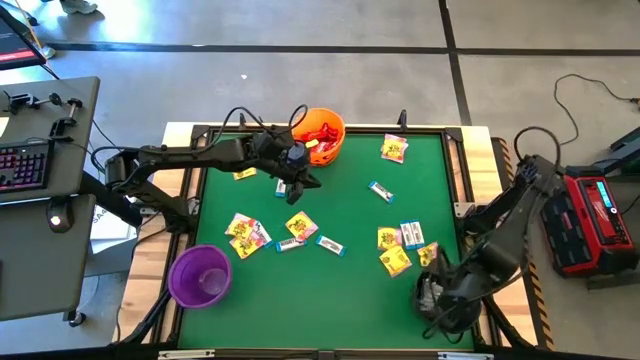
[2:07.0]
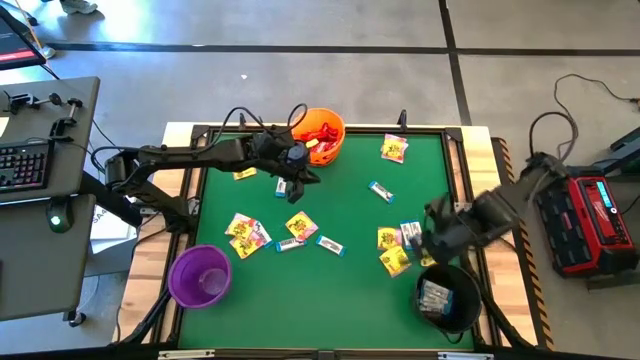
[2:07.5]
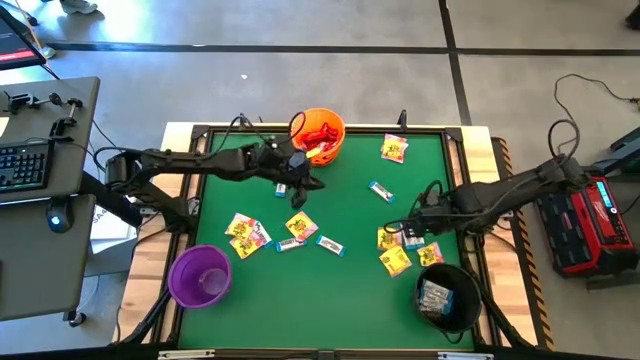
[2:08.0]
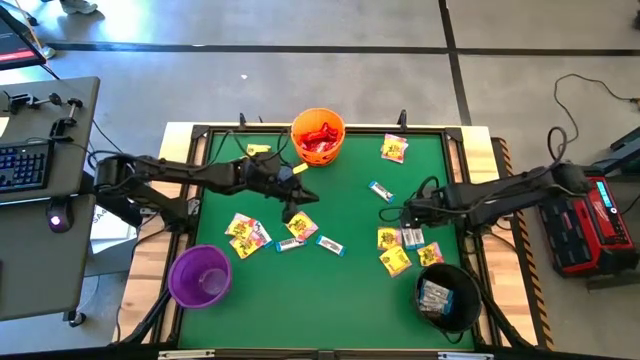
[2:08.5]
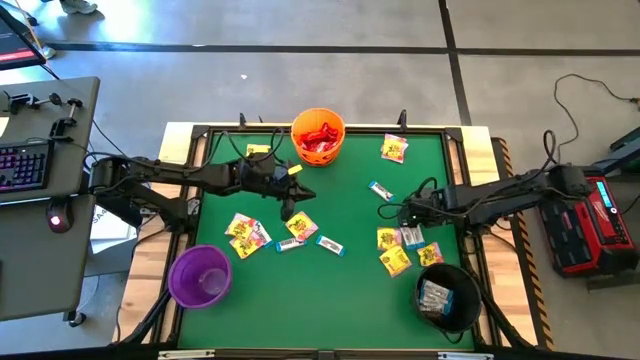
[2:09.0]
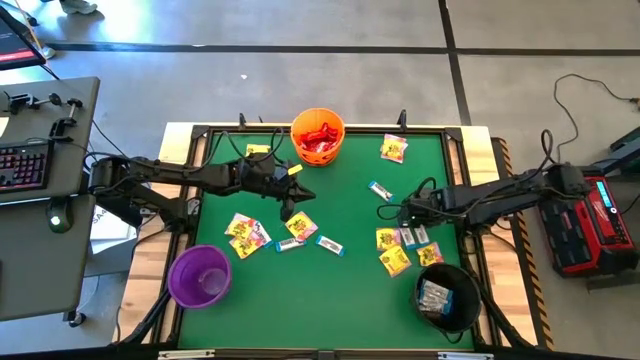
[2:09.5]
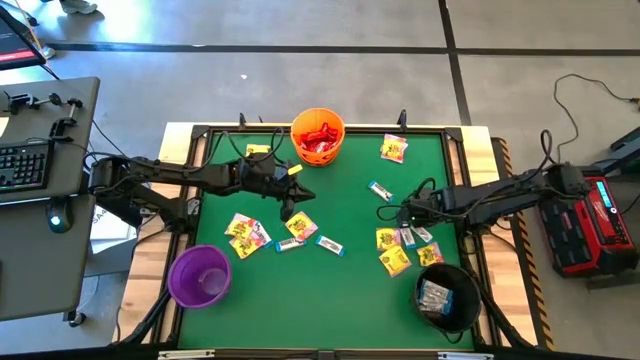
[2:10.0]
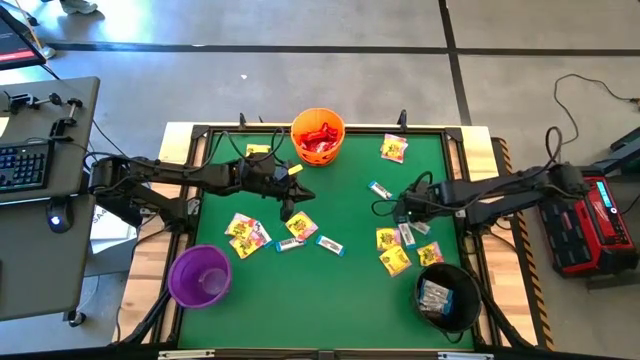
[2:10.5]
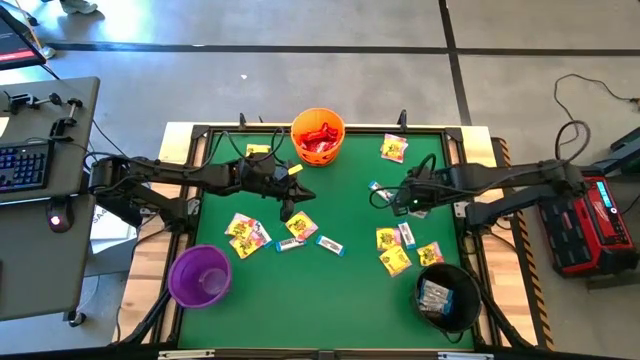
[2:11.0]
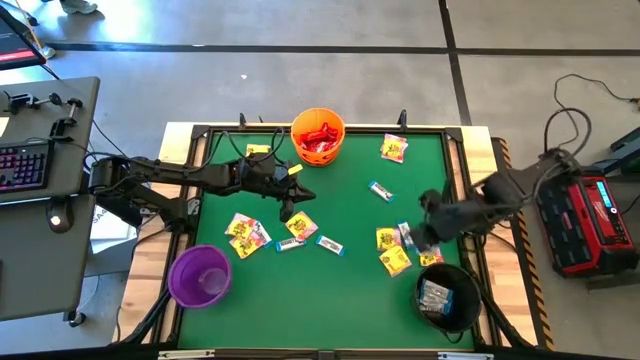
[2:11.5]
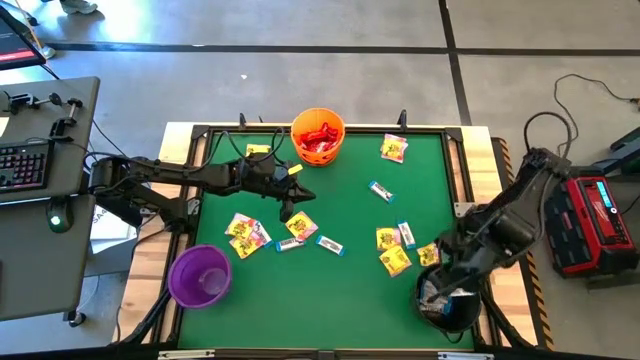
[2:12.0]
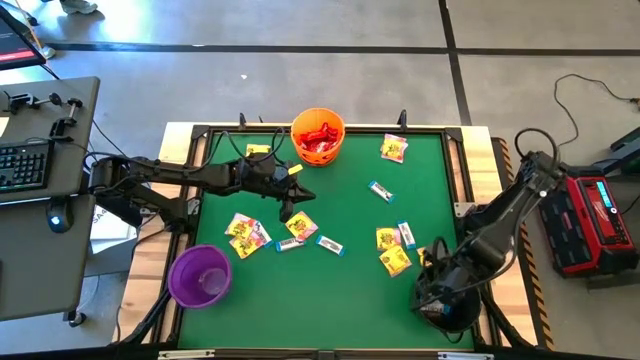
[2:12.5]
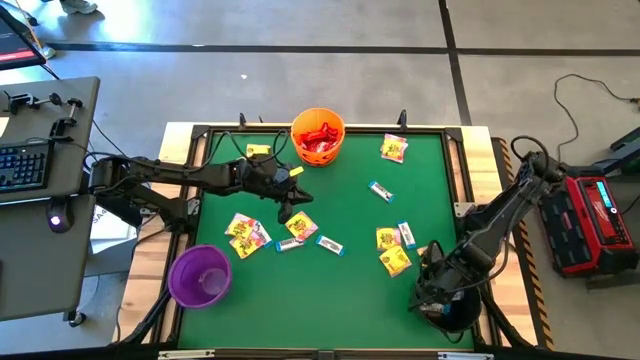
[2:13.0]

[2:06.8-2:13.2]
Task: Sort candy by brand, put in halloween buckets
Put the white chocolate bar into the black bucket

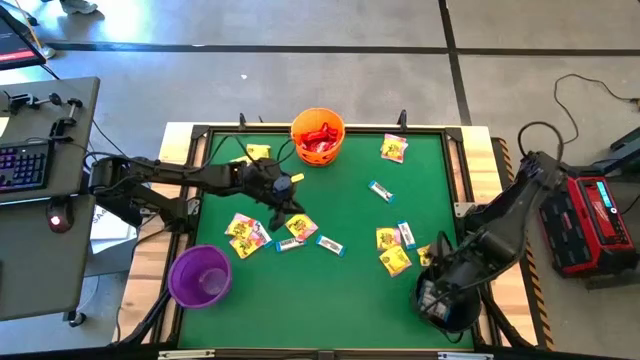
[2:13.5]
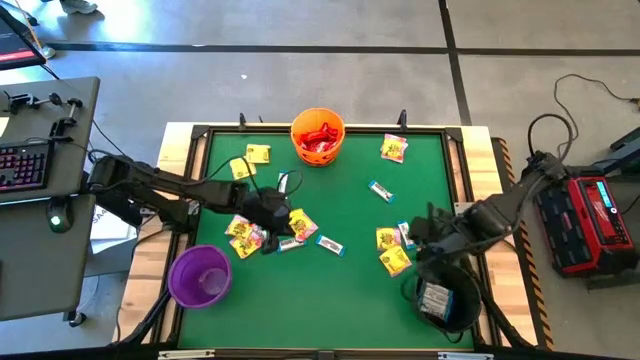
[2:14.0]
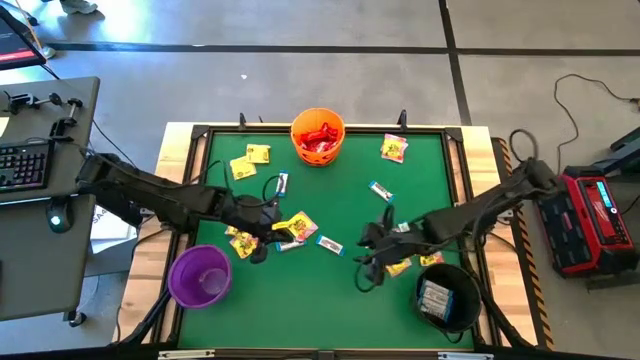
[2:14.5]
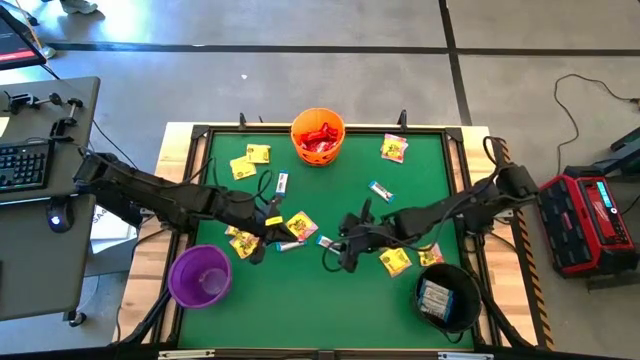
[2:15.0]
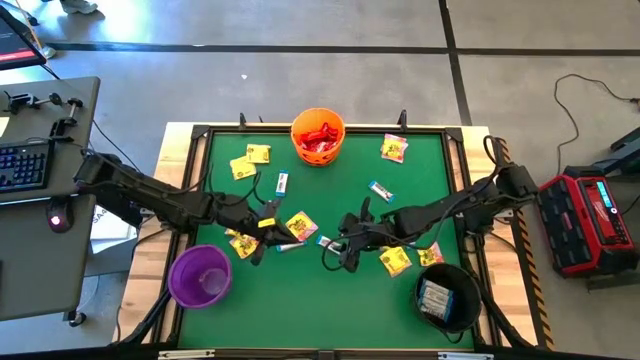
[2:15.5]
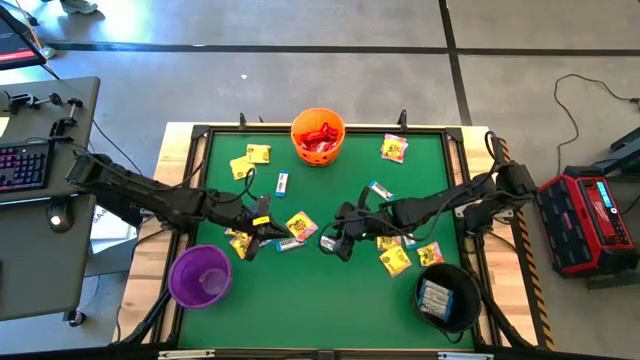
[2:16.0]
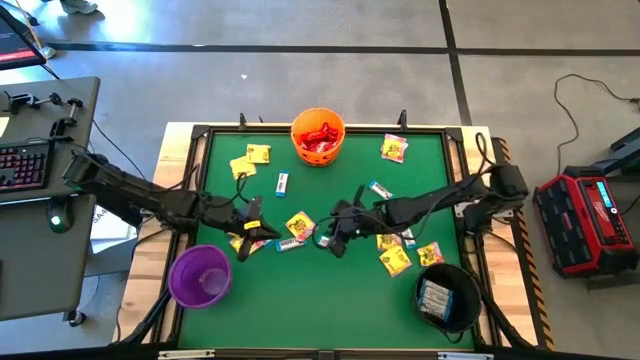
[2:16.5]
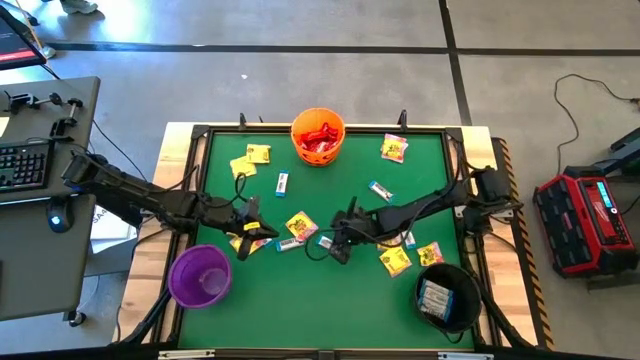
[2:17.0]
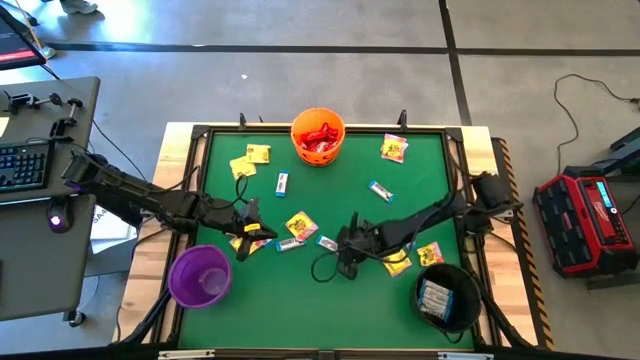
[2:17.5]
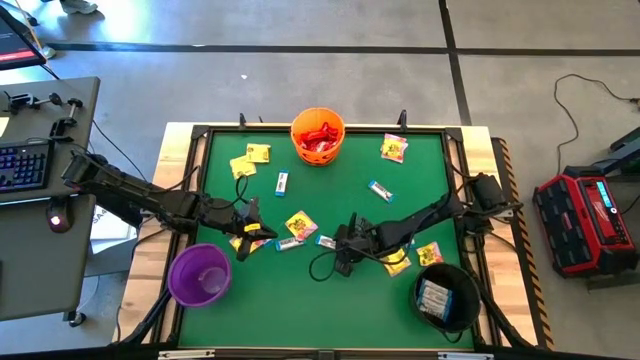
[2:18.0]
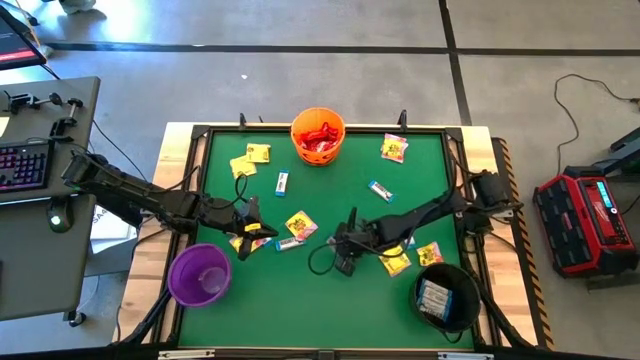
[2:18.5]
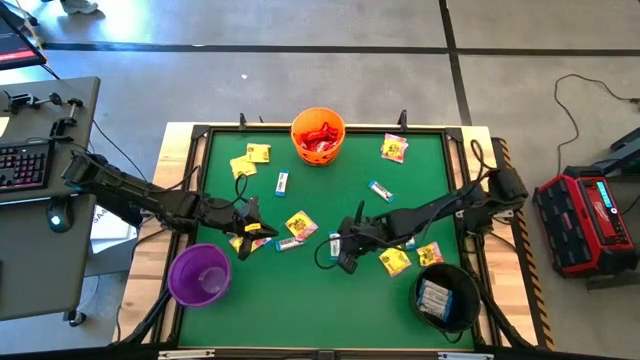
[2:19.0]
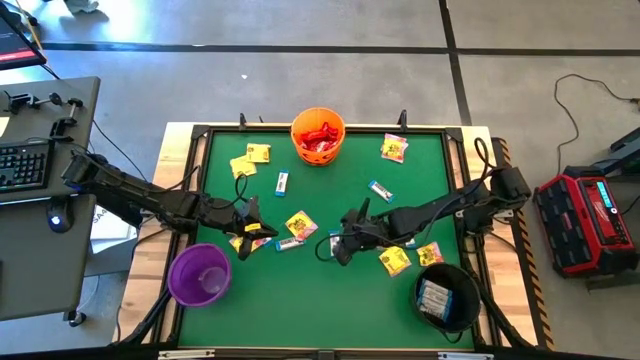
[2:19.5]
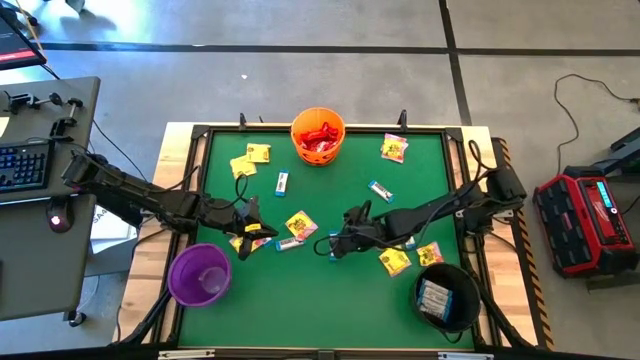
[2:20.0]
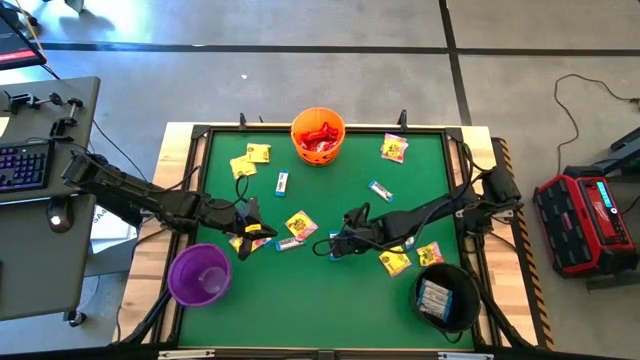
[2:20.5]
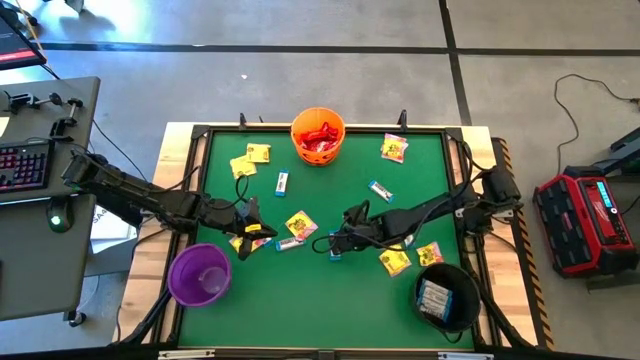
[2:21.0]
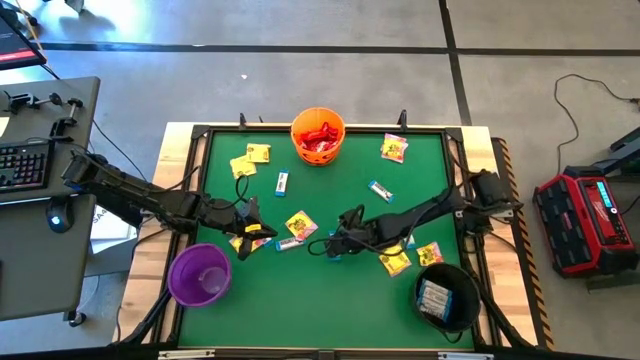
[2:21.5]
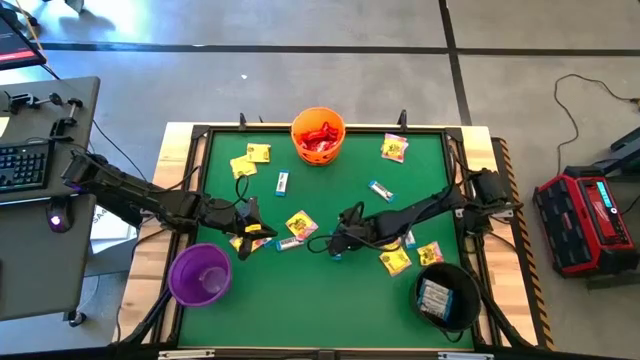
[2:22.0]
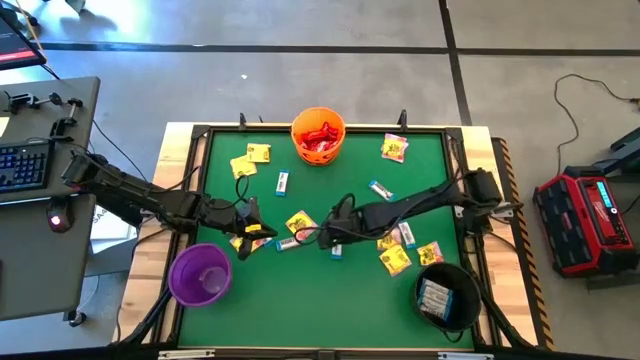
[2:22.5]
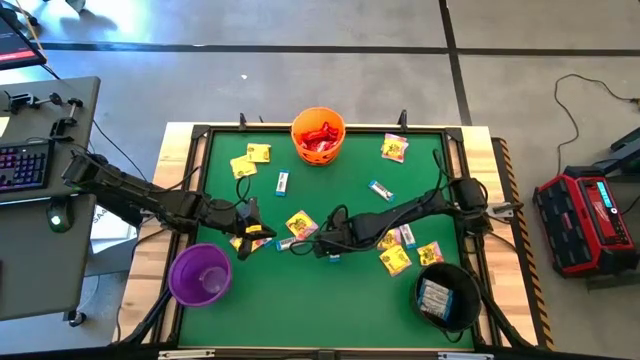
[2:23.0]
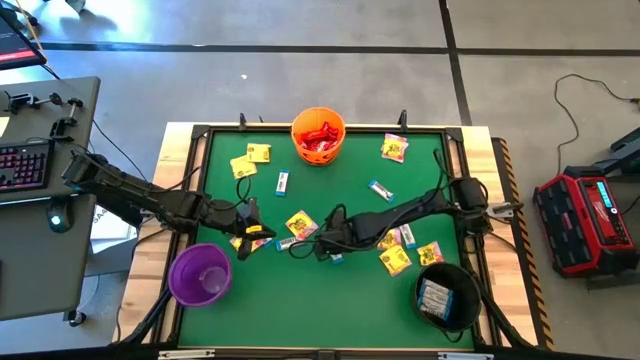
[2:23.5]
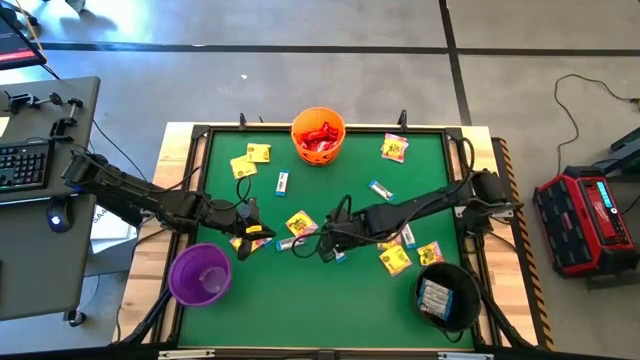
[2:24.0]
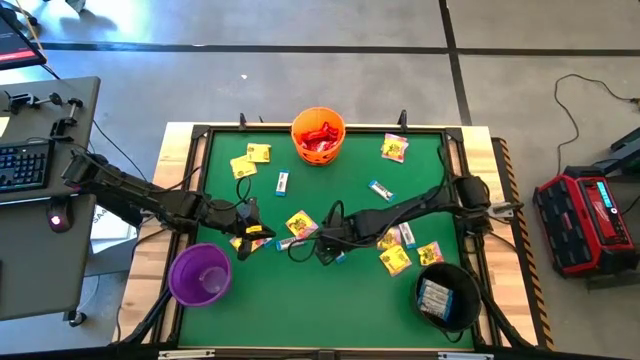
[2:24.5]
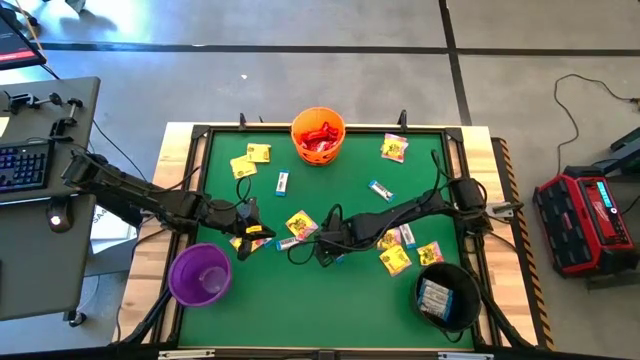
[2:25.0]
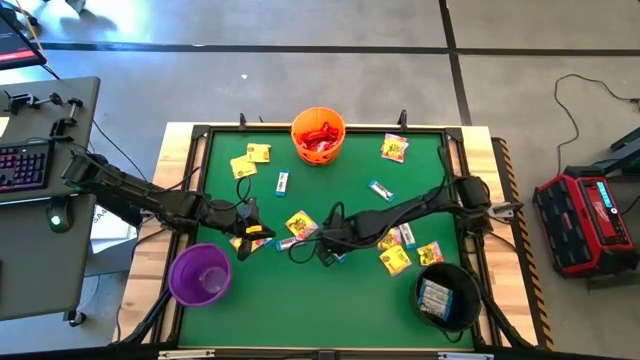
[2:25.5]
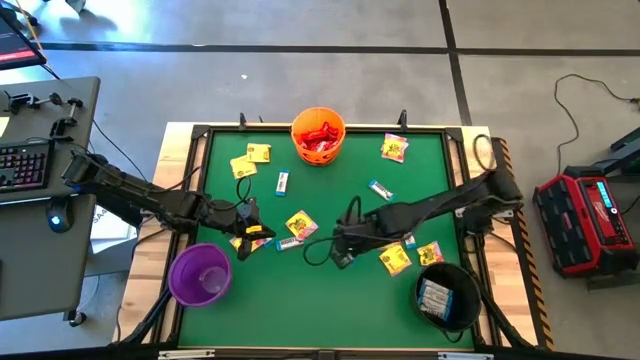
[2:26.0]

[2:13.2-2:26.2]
Put the white chocolate bar into the black bucket

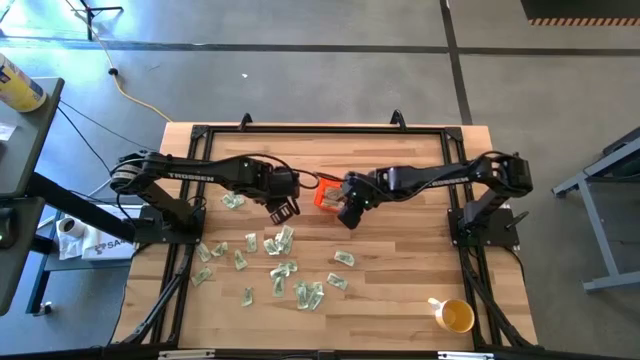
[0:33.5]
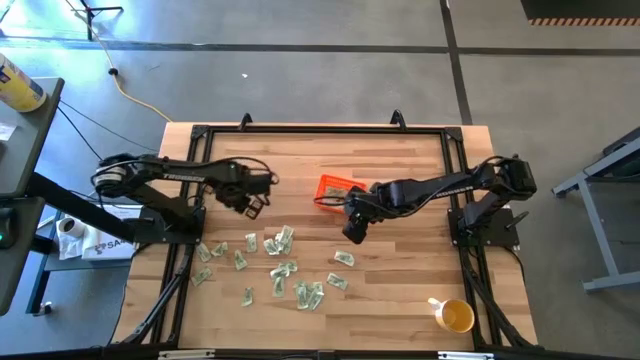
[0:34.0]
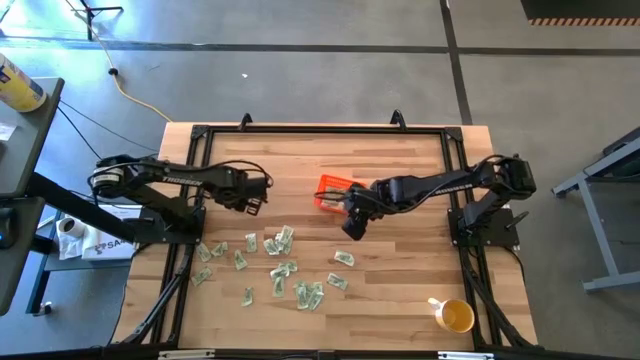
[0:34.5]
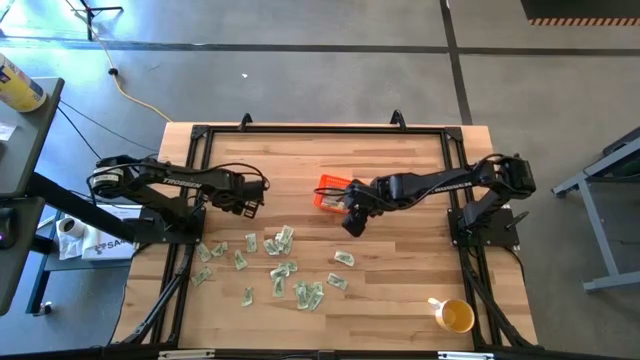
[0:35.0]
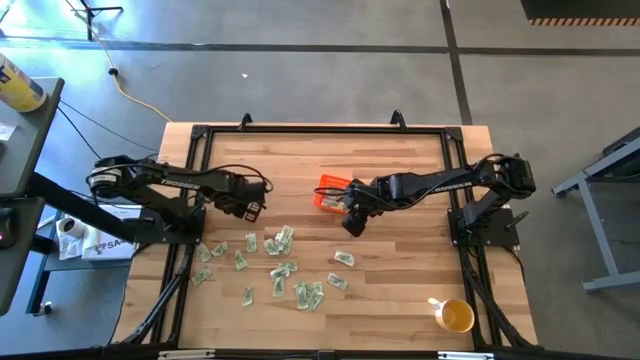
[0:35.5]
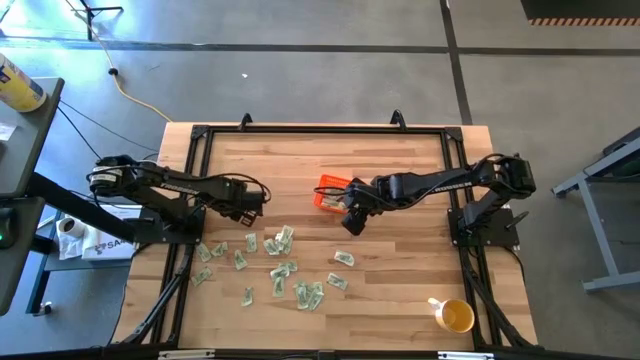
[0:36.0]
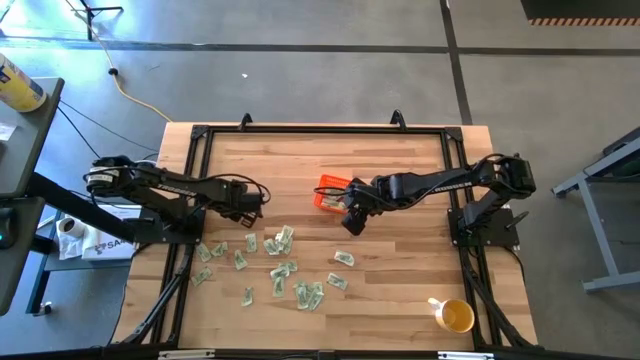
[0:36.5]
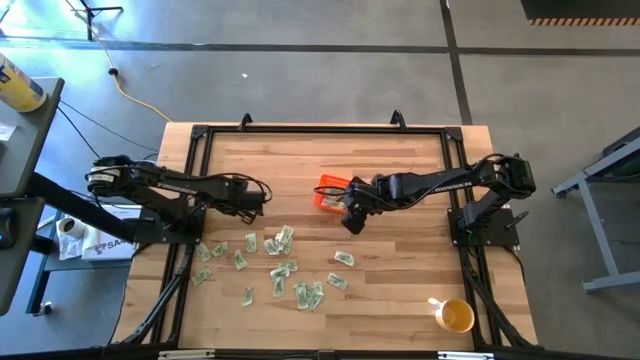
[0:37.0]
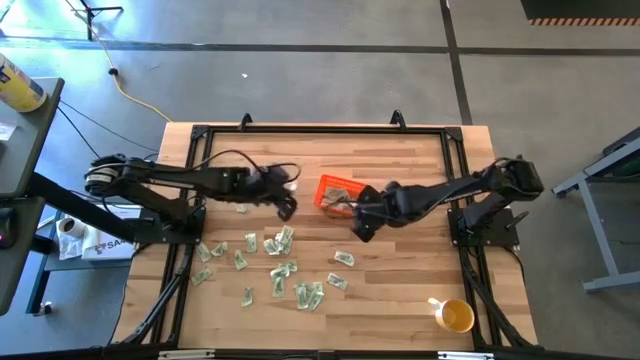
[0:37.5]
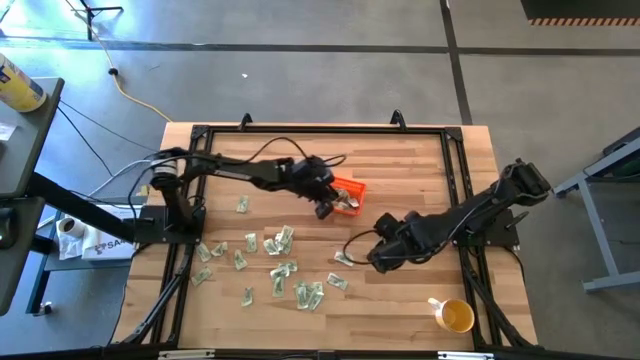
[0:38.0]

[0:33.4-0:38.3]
Task: Pick and place Stevia / Truvia into bins
Put the green stevia packet into the orange basket
